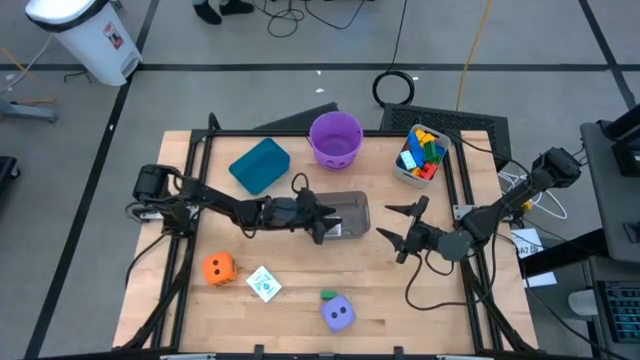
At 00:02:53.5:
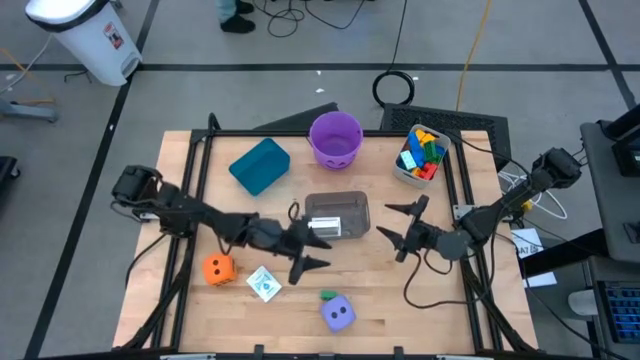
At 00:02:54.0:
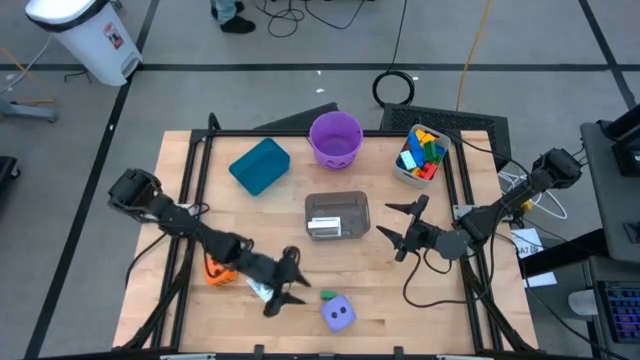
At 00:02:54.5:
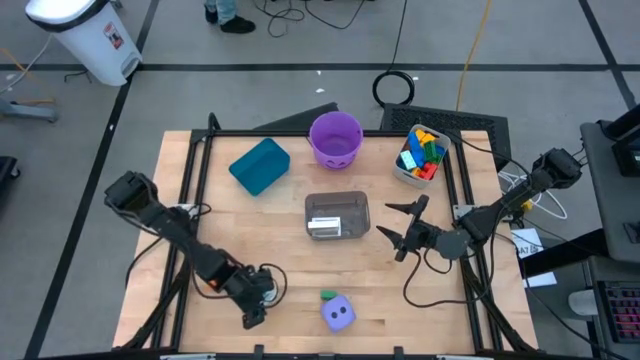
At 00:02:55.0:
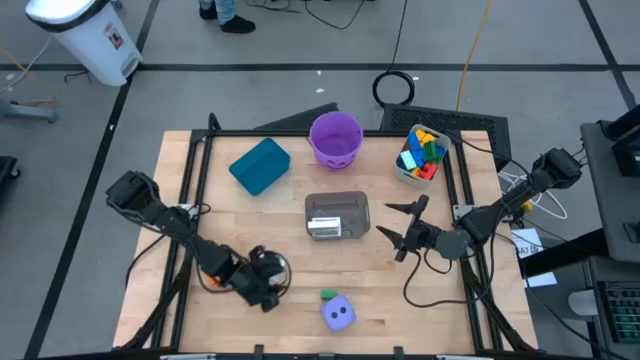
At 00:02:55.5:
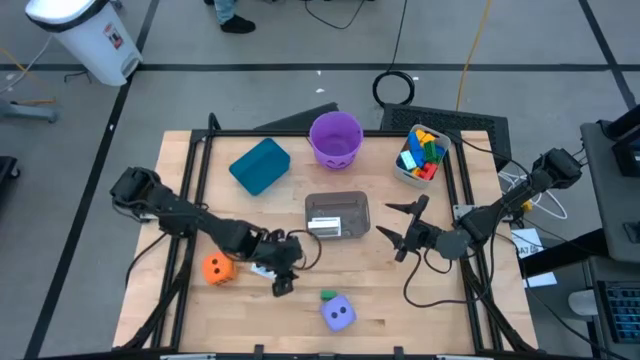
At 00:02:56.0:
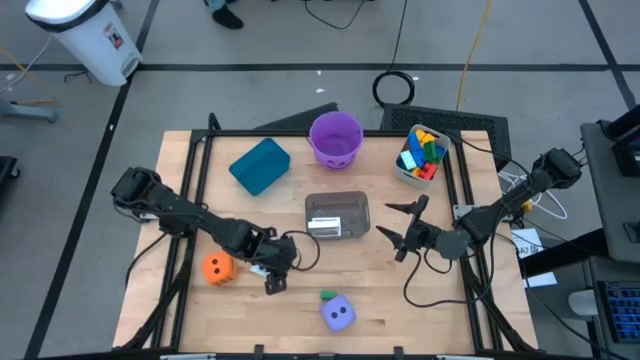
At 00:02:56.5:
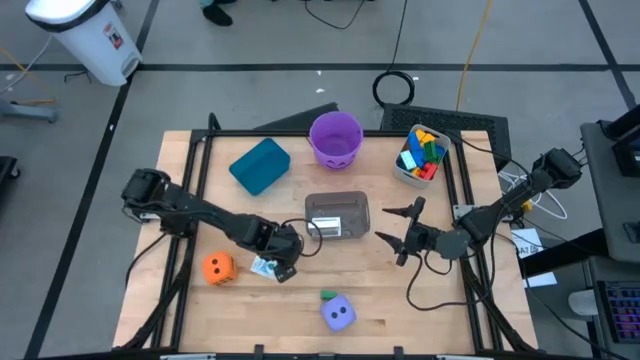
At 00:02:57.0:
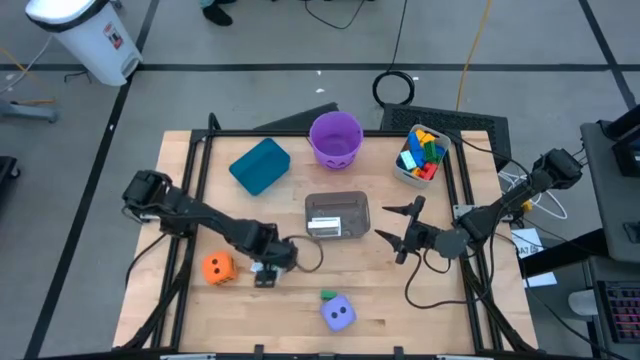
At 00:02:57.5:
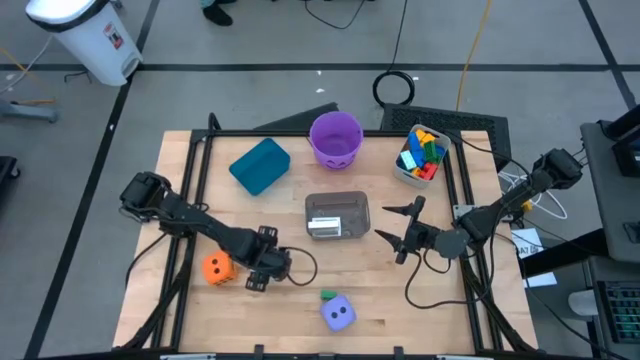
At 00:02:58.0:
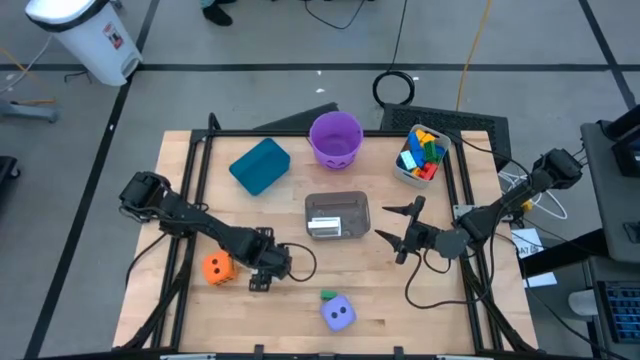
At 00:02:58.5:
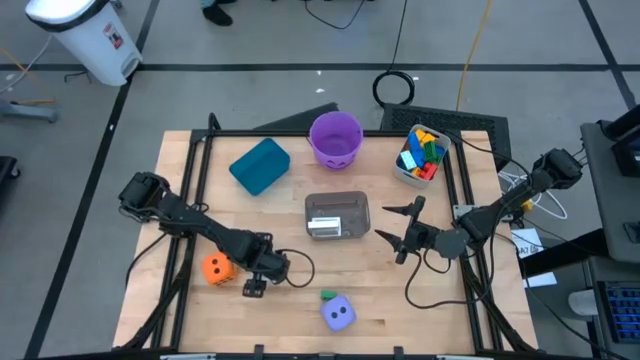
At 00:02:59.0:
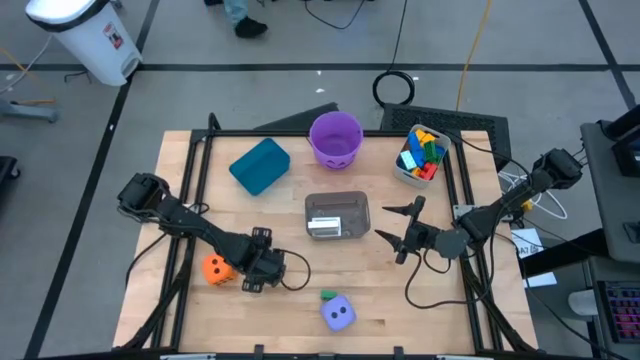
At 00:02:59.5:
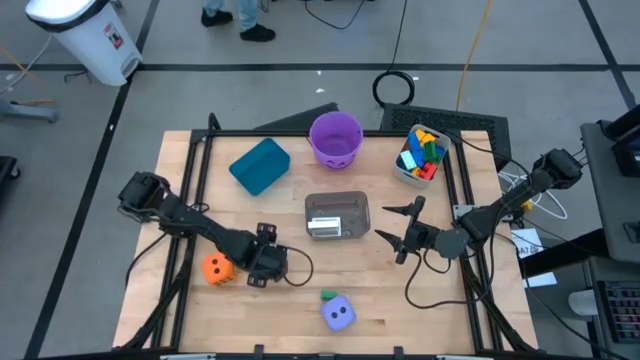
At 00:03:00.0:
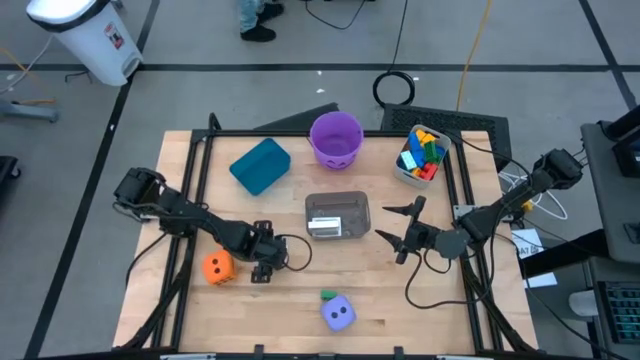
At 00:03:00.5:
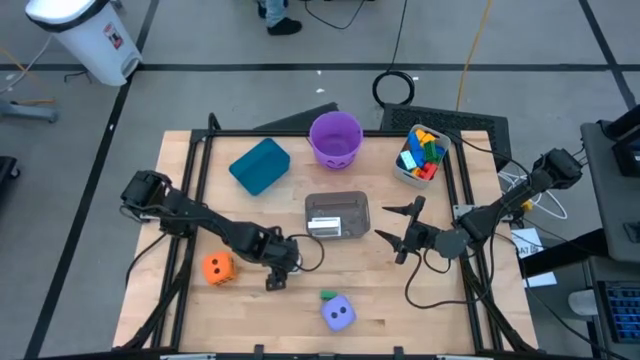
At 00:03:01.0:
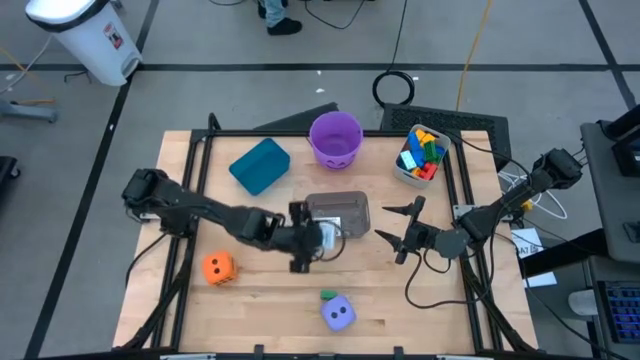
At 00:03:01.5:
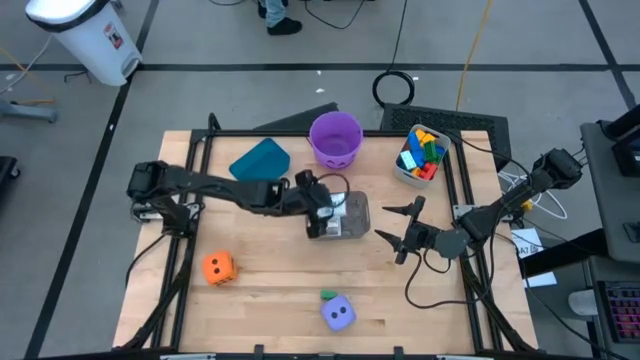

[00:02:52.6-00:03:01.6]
Task: Pick & Place Toys
Put the blue deck of cards into the transparent black bin

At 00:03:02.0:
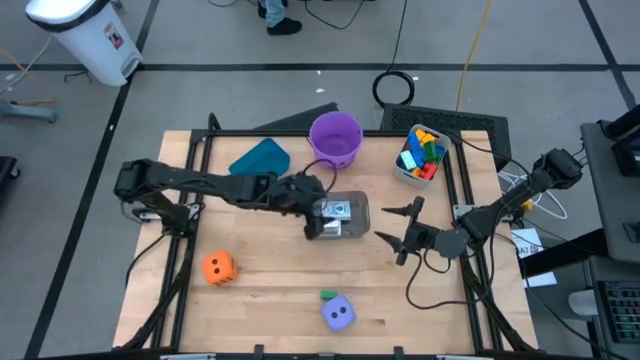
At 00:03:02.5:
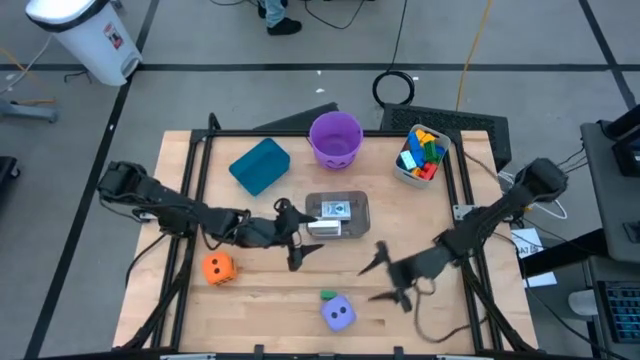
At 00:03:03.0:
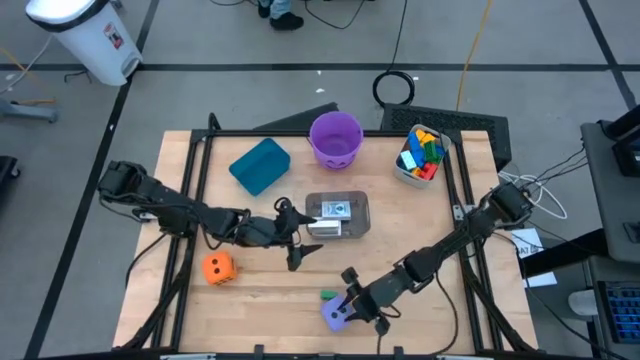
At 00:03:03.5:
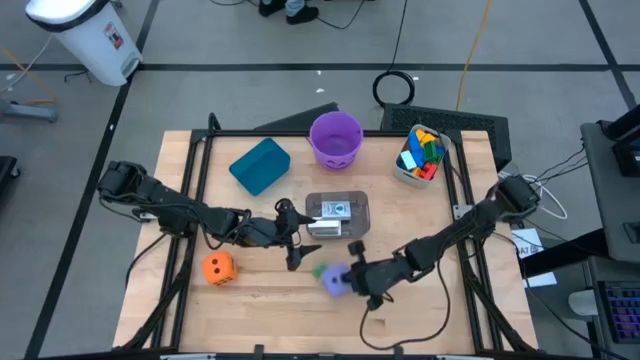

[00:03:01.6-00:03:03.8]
Adjust the purple dice

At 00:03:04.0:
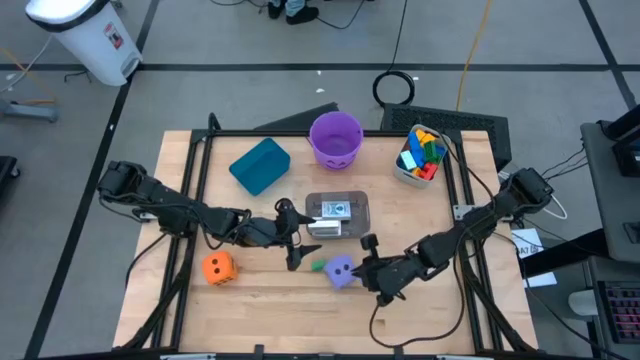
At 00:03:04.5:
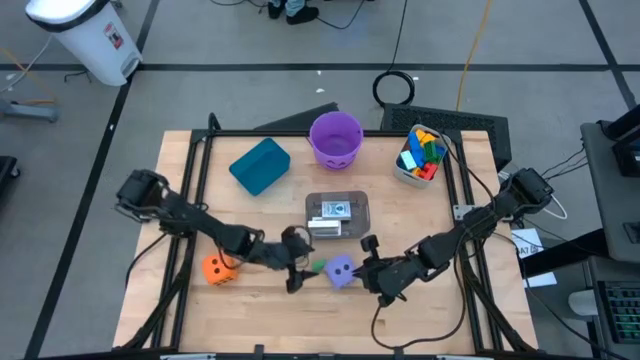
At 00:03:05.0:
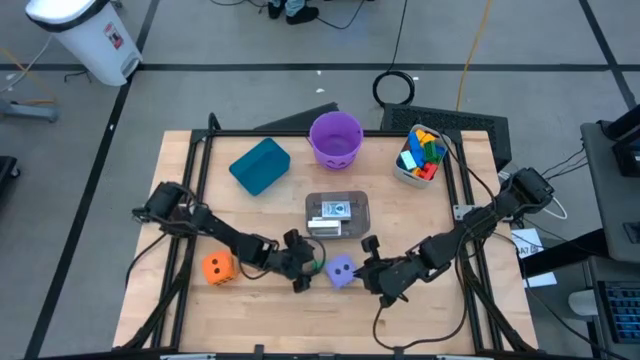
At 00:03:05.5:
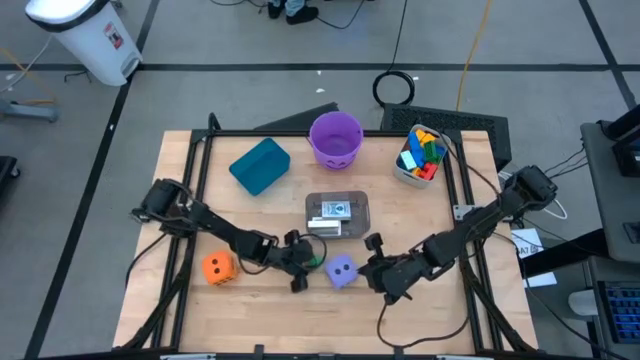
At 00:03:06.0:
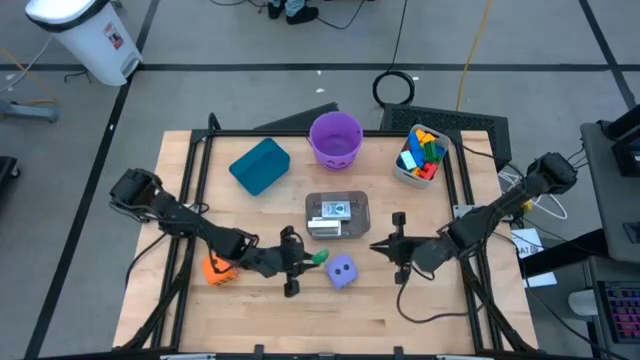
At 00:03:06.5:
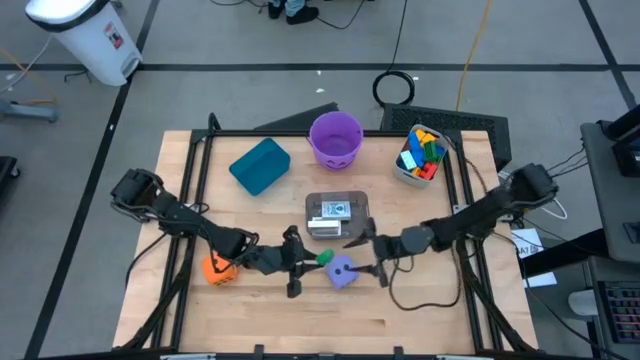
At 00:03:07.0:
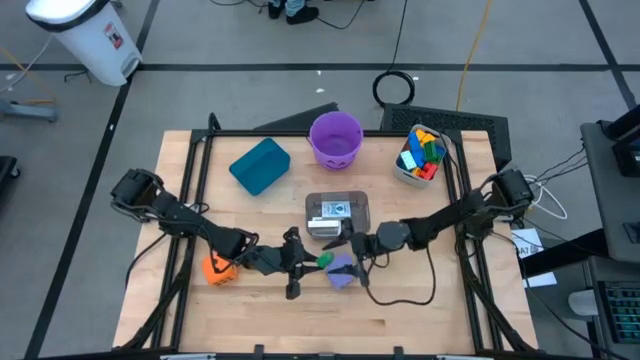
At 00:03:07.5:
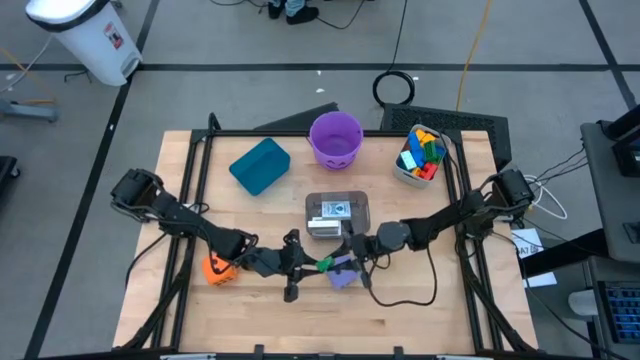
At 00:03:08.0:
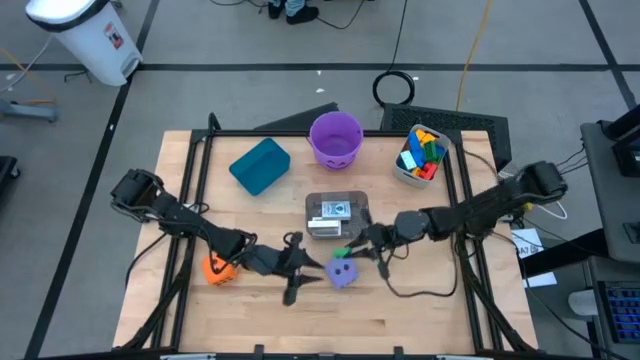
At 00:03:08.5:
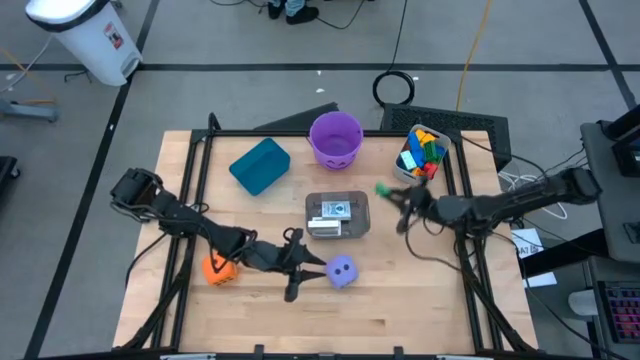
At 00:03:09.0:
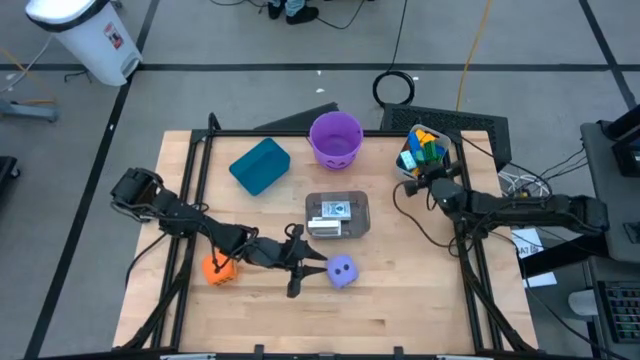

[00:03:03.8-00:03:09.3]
Put the green game piece into the white bin

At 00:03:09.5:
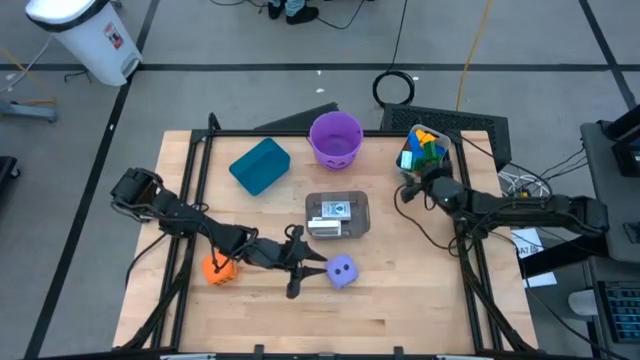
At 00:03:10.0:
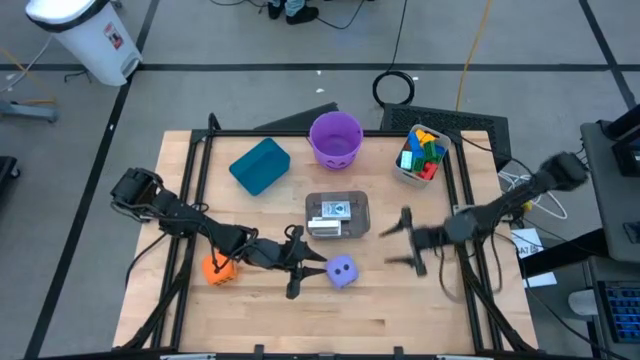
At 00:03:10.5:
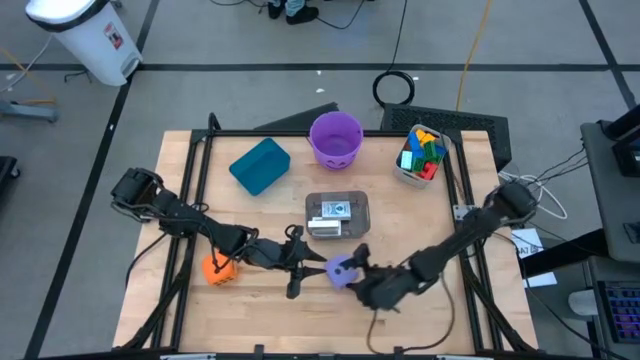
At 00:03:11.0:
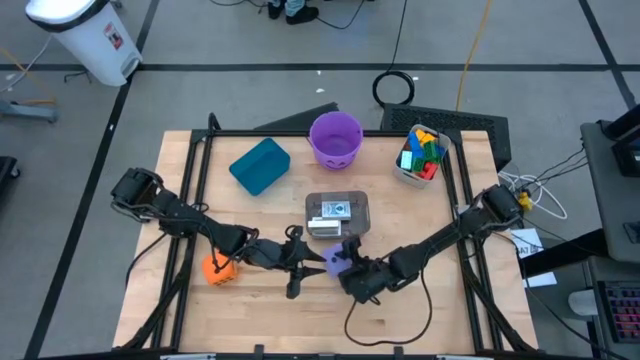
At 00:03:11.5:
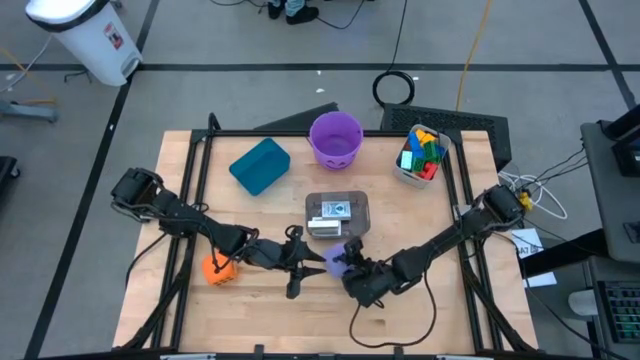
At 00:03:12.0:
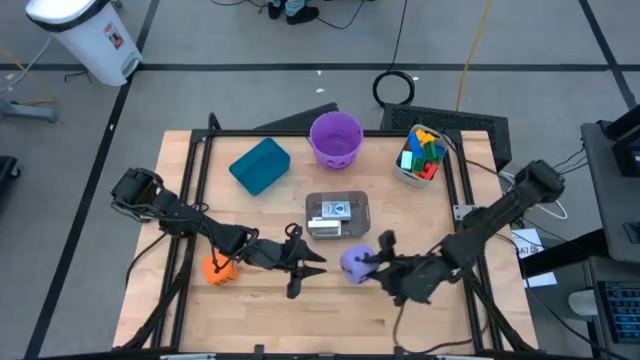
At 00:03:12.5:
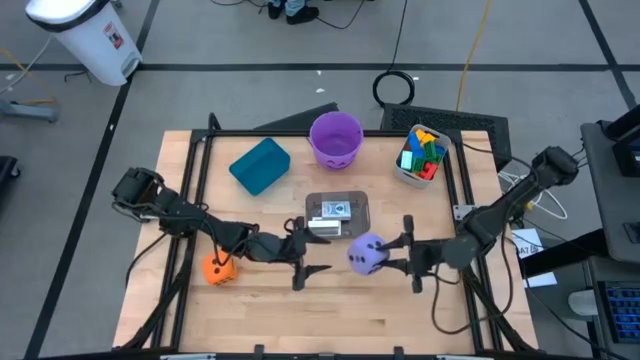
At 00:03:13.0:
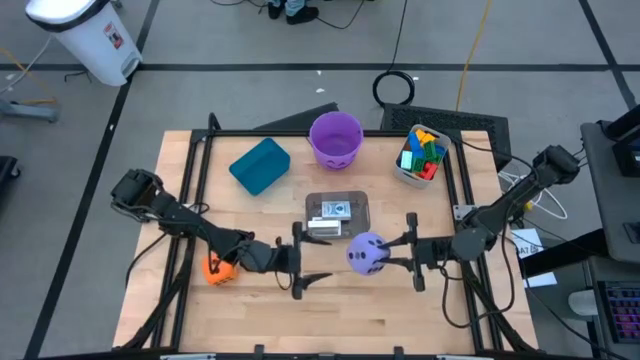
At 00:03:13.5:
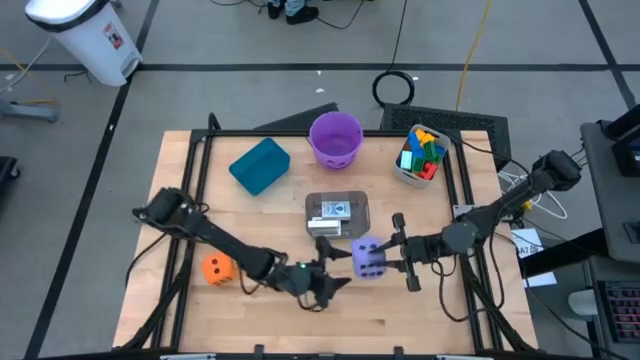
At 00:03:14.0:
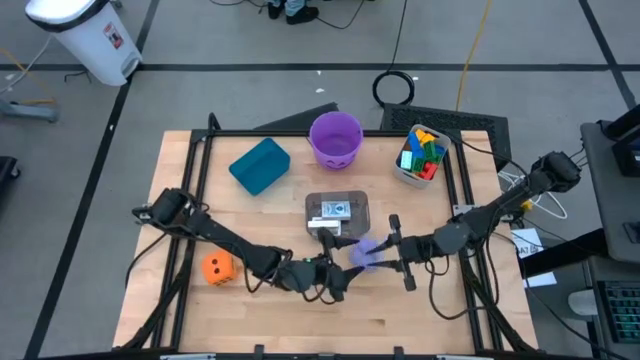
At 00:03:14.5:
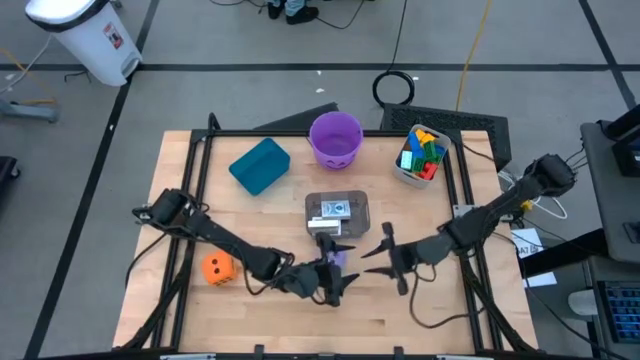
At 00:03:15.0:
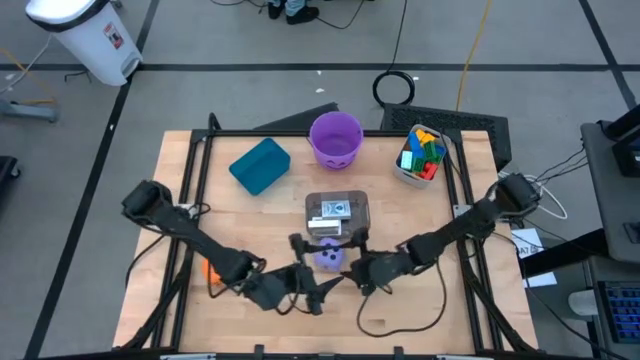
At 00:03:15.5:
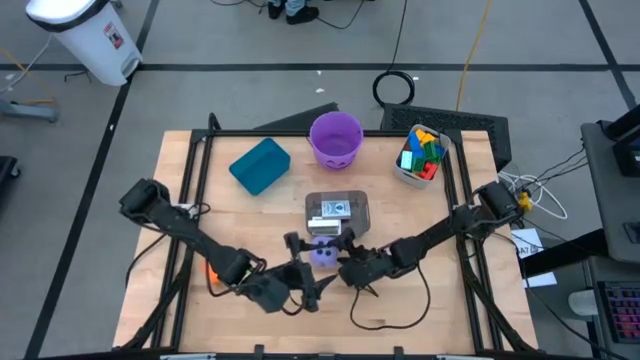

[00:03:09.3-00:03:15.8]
Put the purple dice into the blue bin
